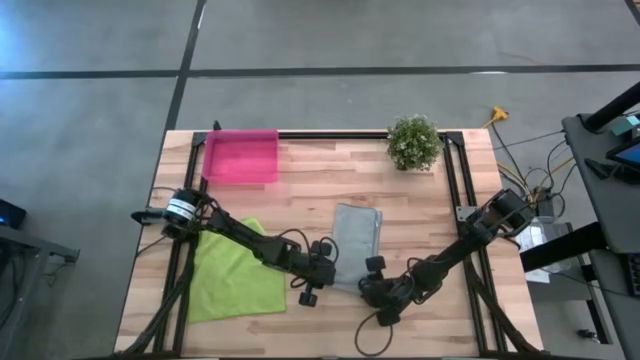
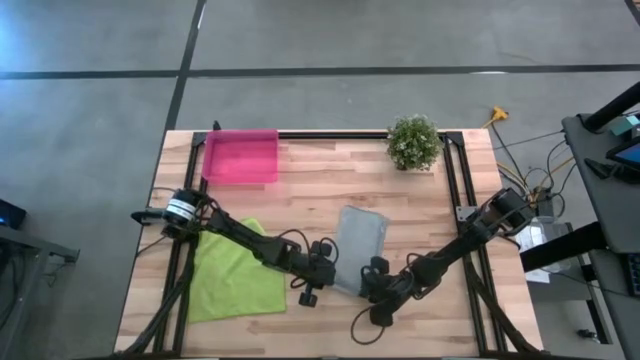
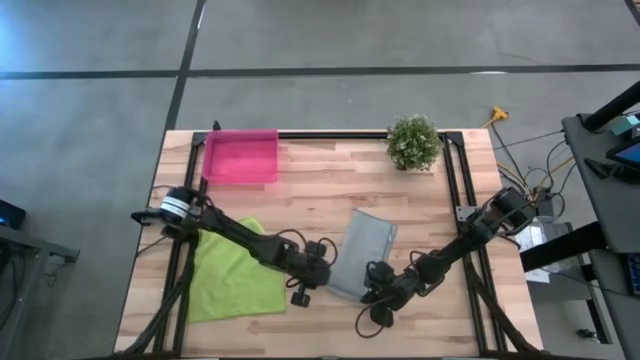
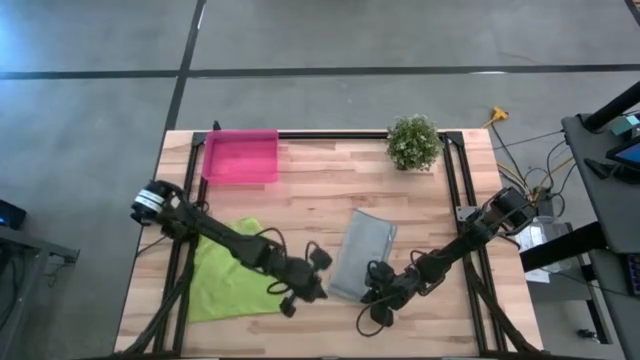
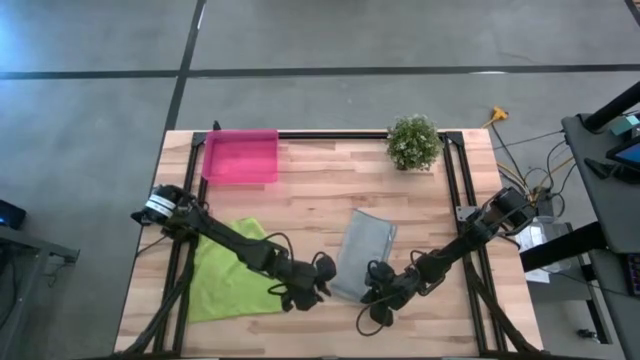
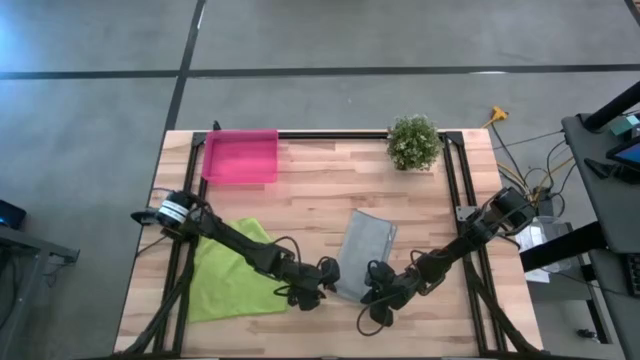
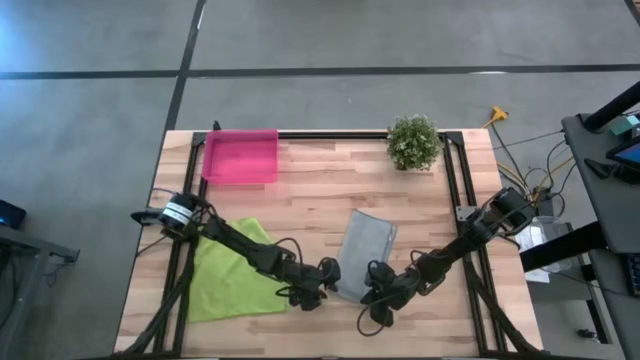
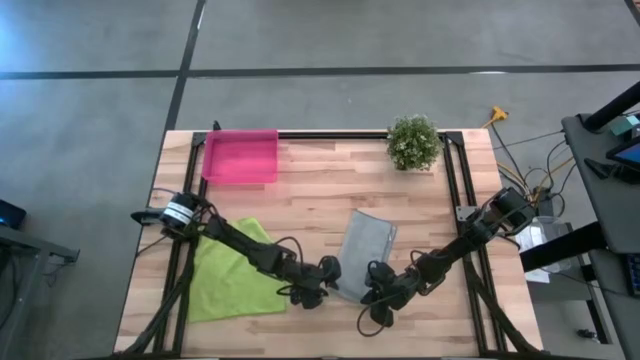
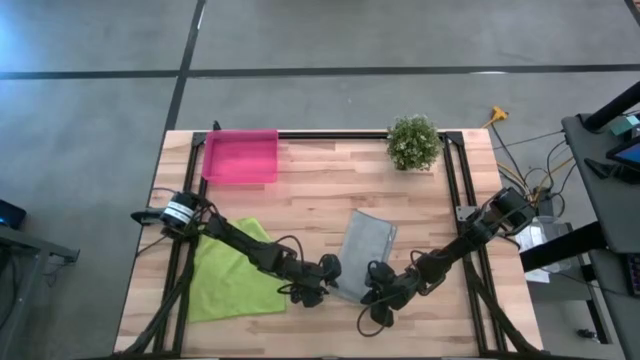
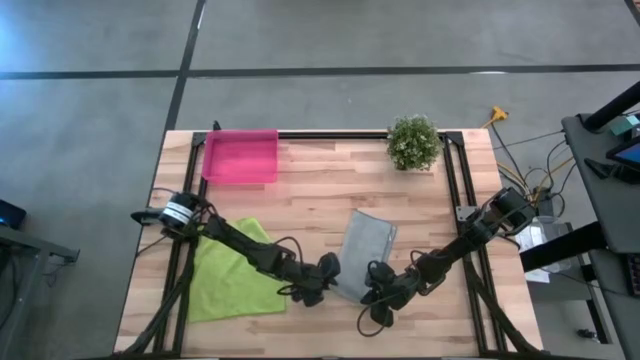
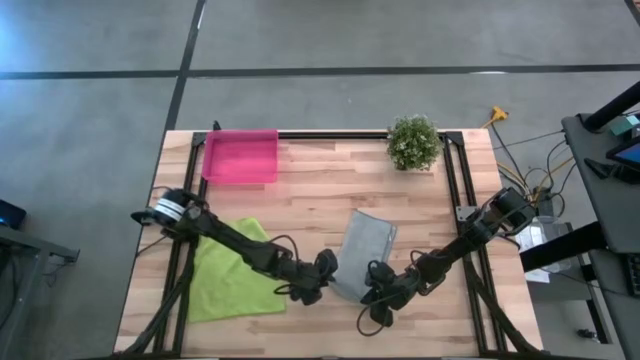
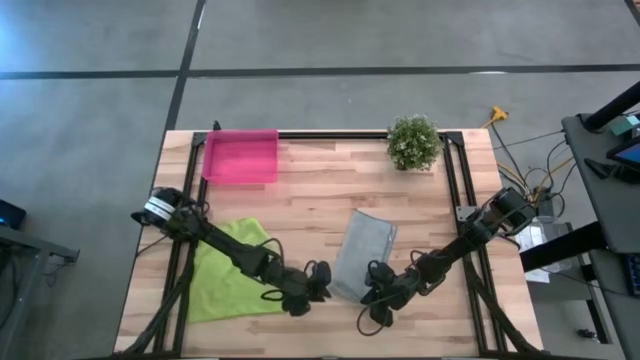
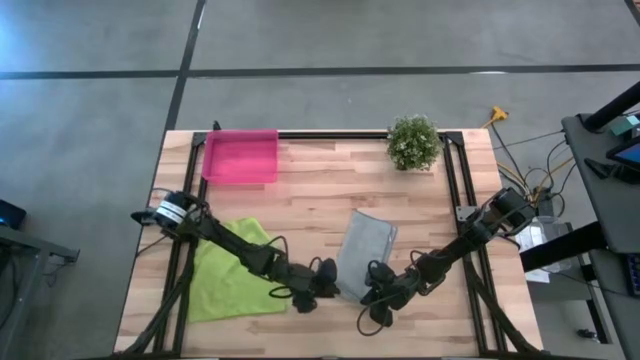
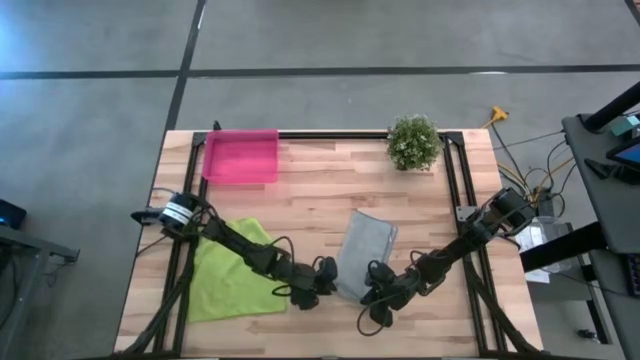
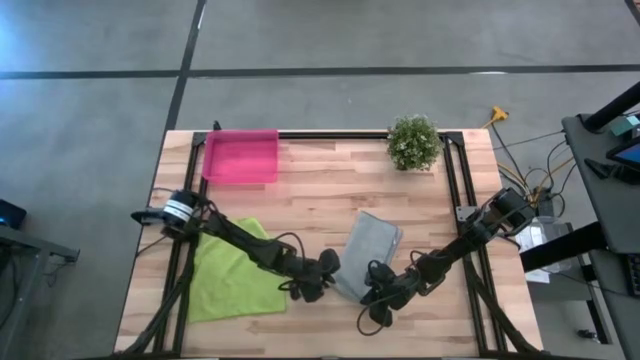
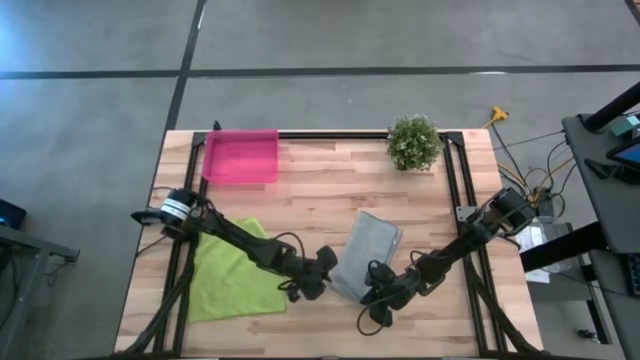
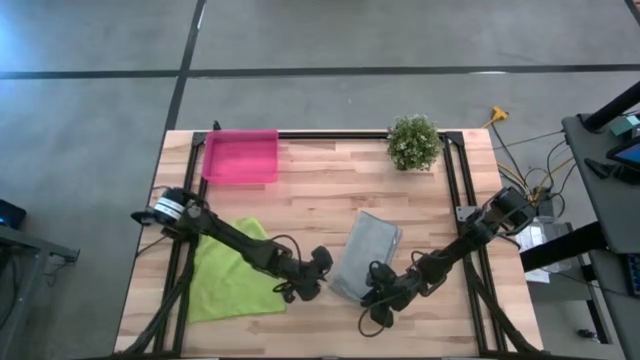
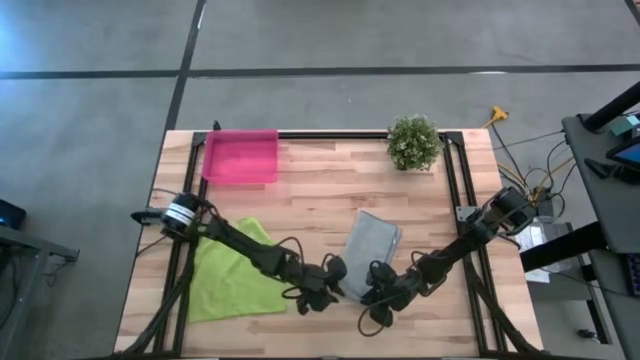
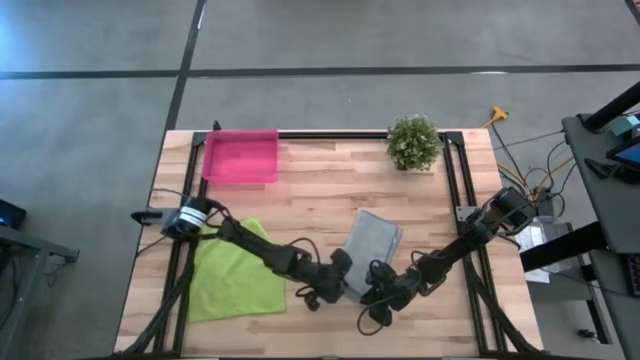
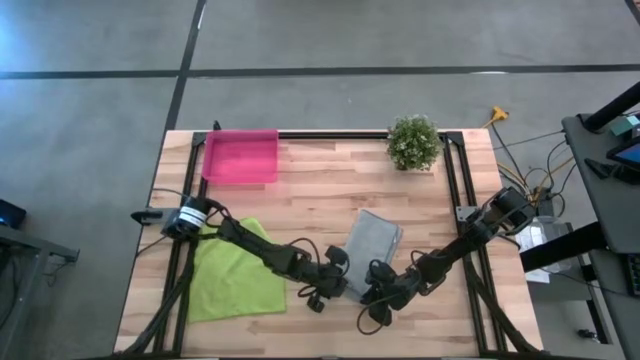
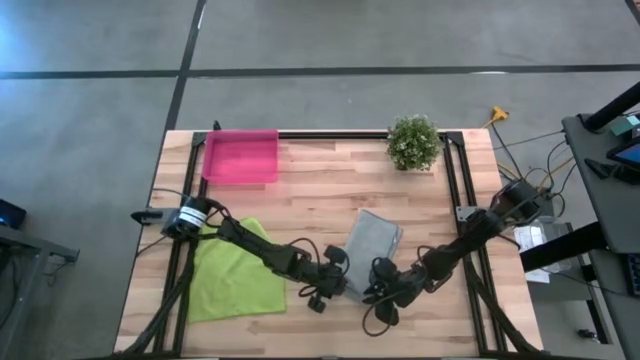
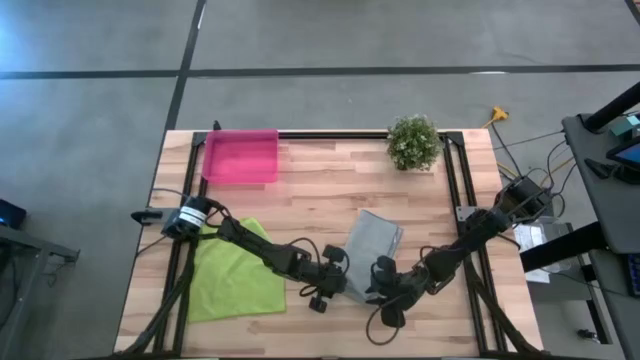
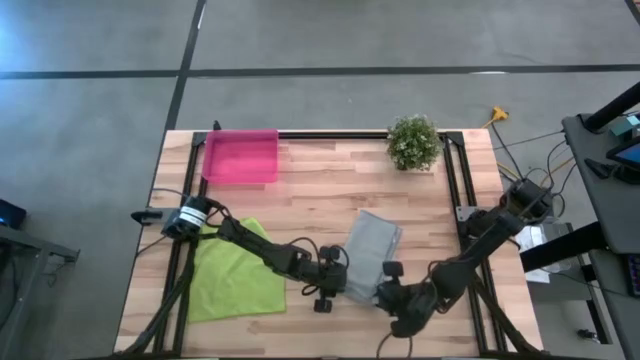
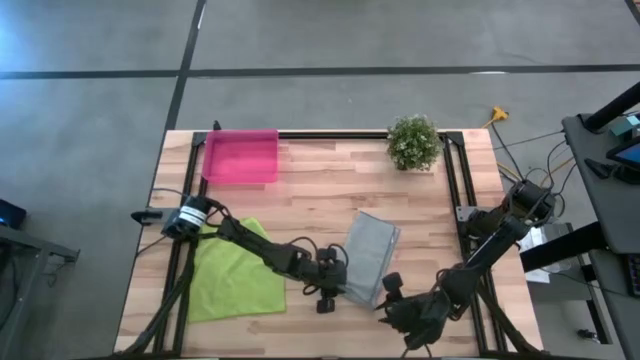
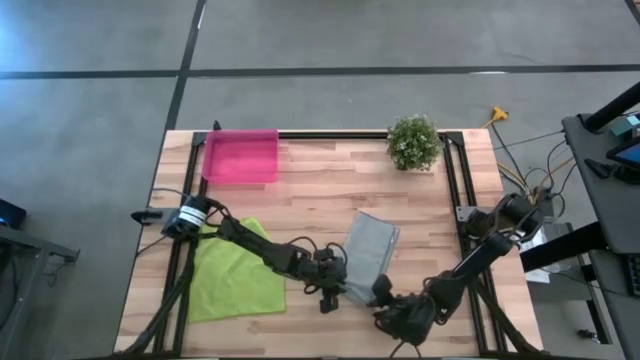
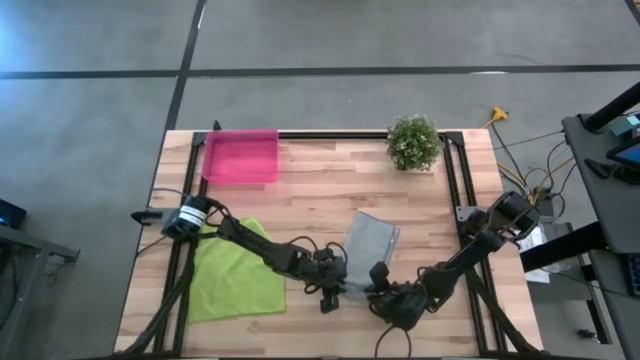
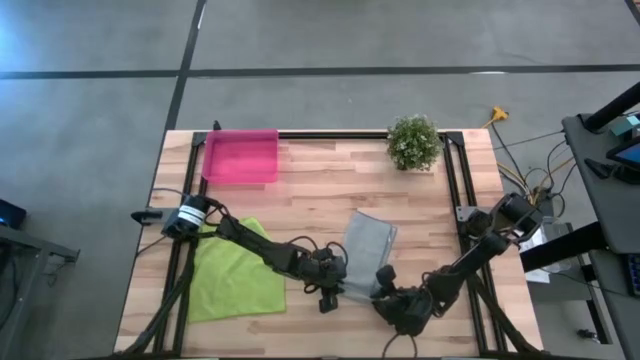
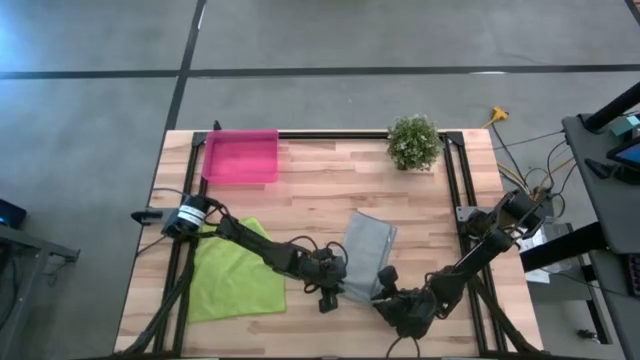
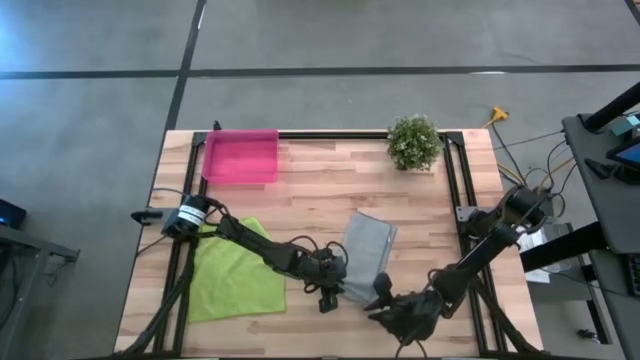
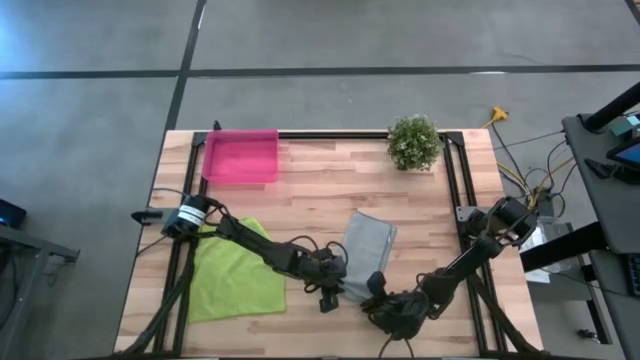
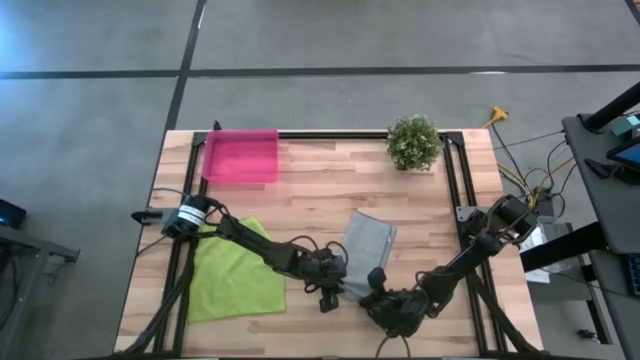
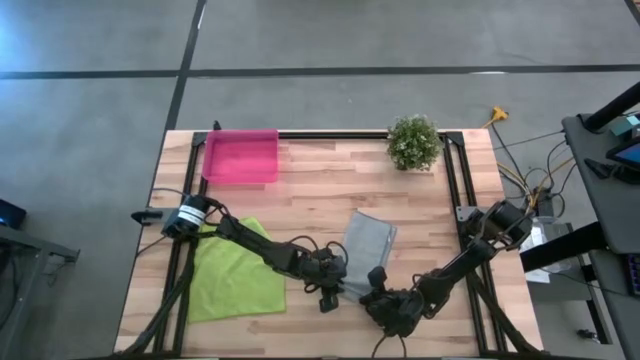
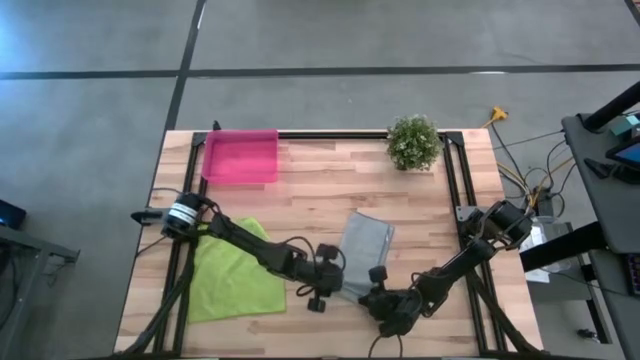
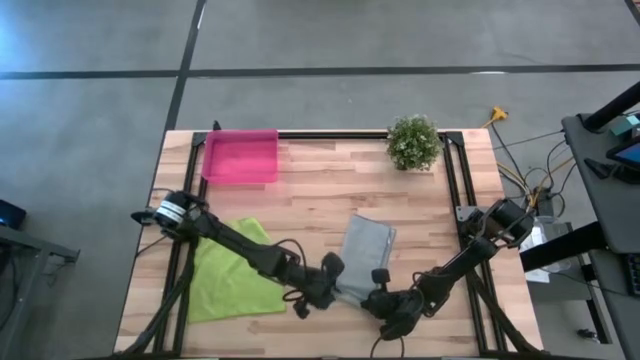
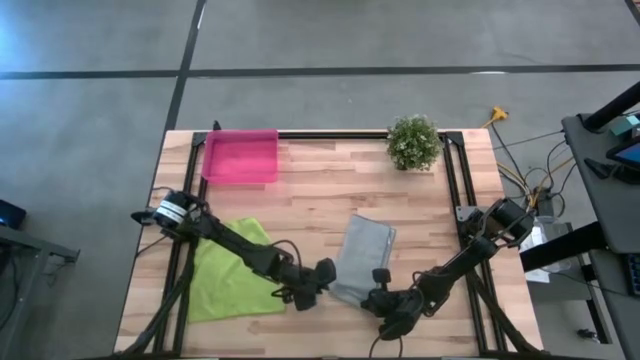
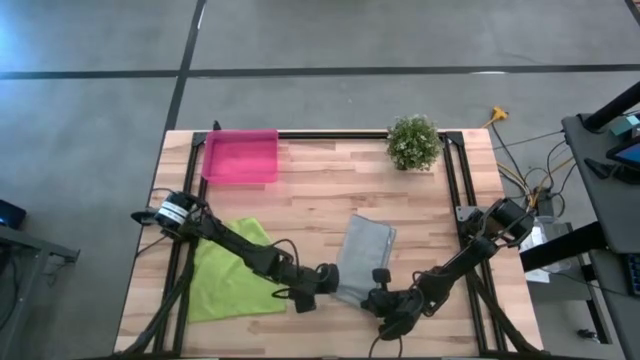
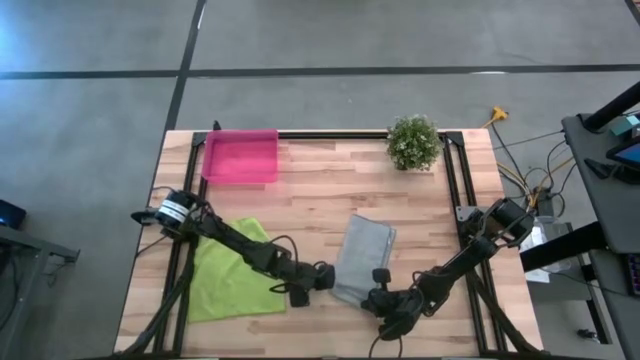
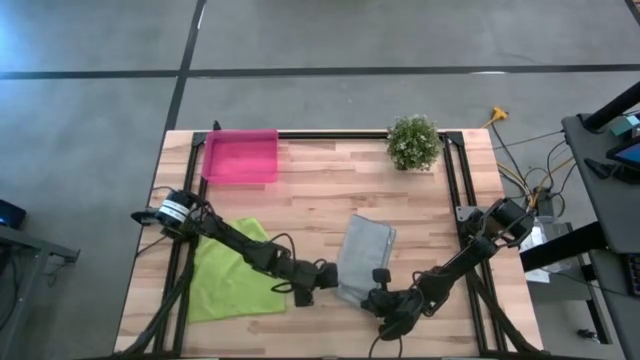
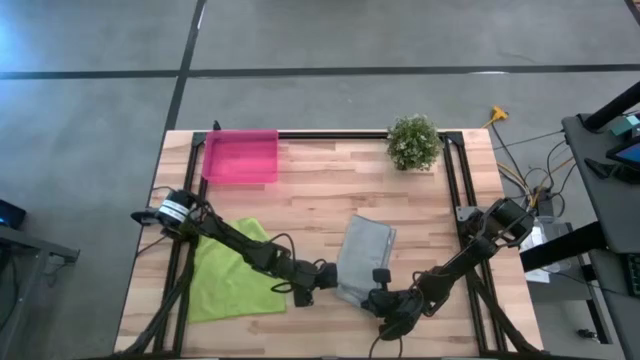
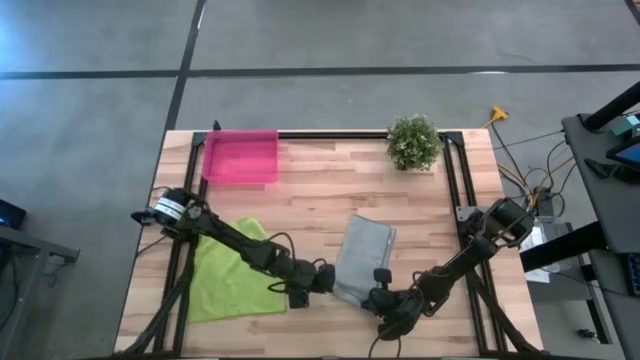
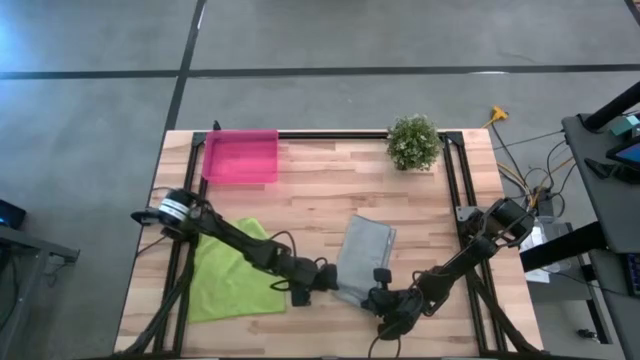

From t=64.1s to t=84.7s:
Task: Roll microfiber towels into tight, uniform cylinder then place into a basket
Roll the blue microfiber cloth
